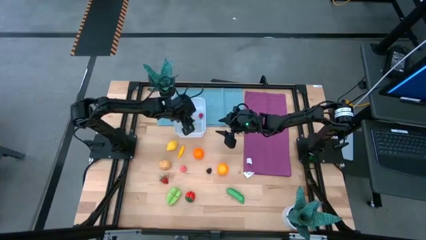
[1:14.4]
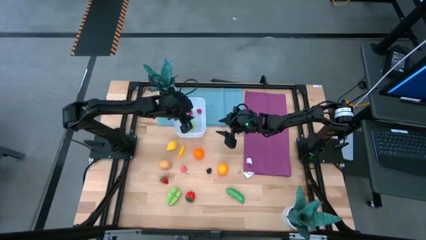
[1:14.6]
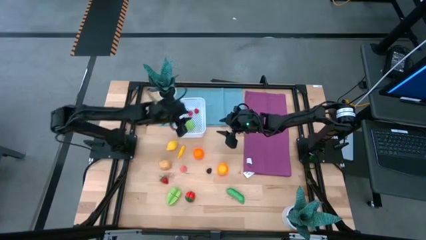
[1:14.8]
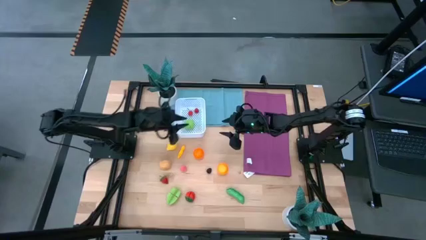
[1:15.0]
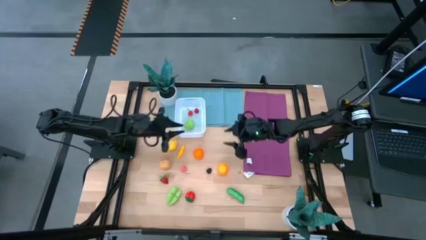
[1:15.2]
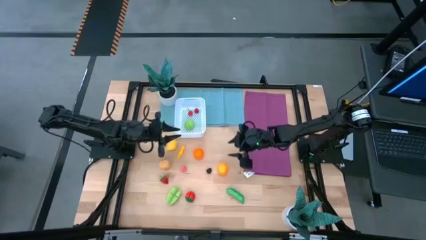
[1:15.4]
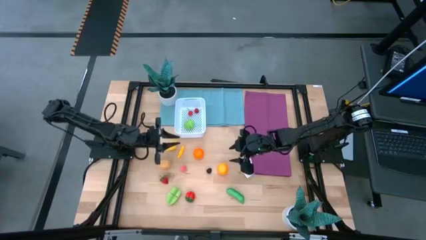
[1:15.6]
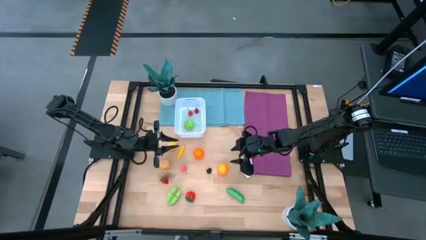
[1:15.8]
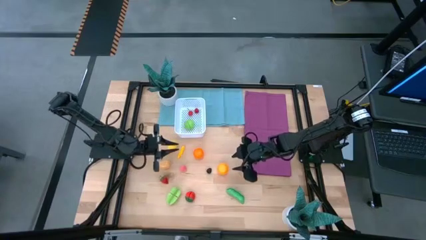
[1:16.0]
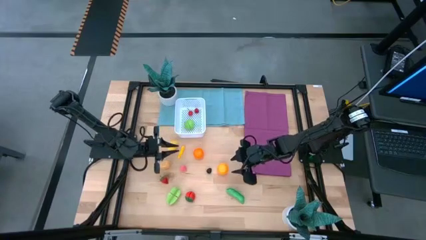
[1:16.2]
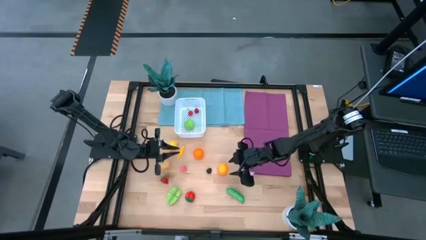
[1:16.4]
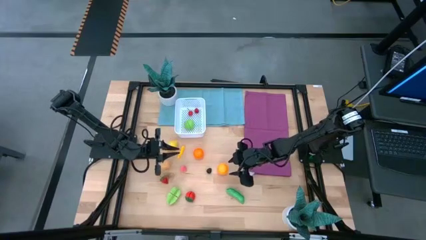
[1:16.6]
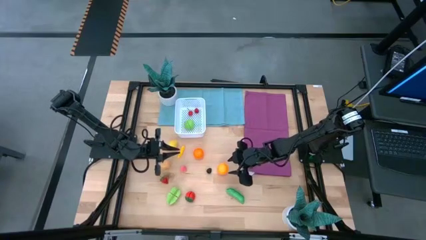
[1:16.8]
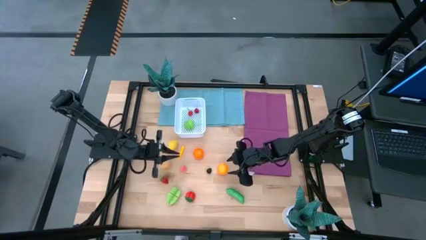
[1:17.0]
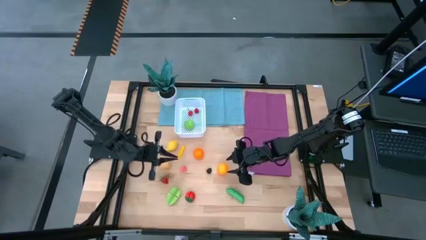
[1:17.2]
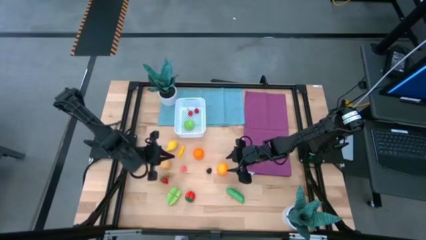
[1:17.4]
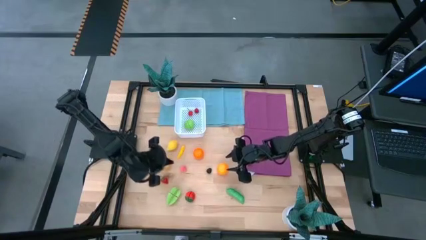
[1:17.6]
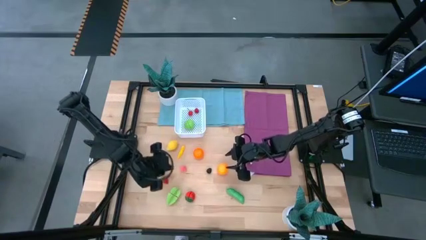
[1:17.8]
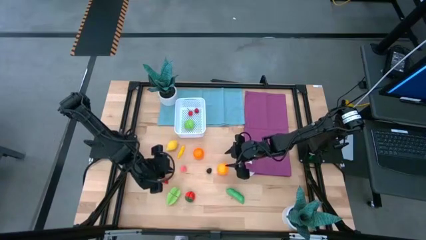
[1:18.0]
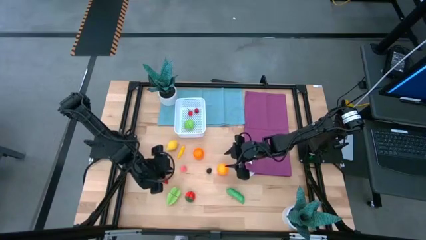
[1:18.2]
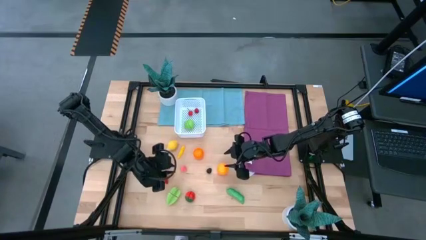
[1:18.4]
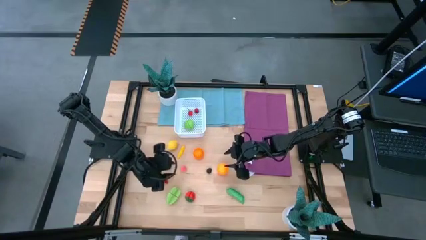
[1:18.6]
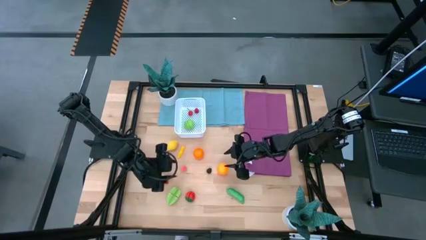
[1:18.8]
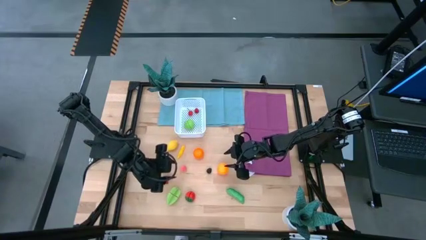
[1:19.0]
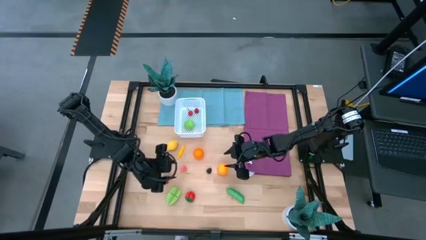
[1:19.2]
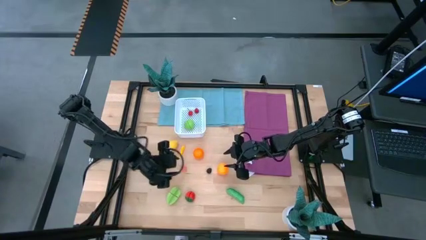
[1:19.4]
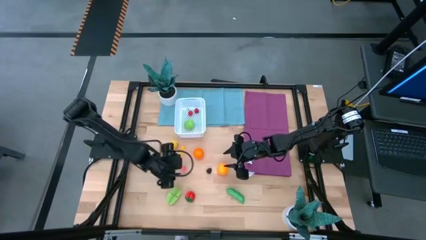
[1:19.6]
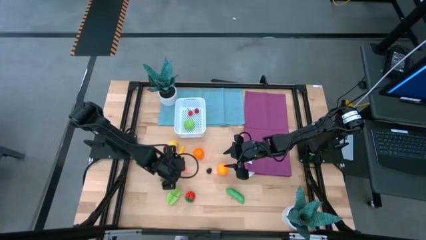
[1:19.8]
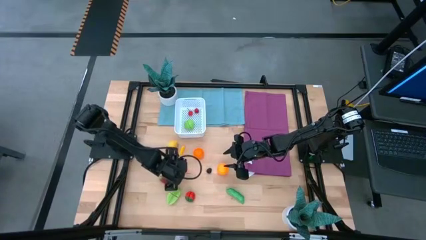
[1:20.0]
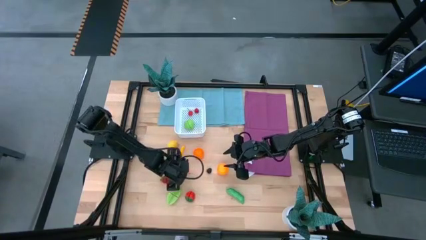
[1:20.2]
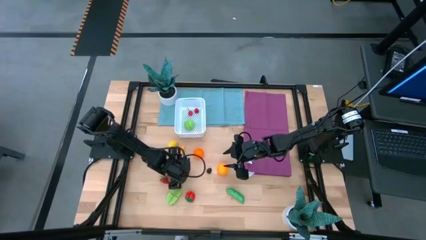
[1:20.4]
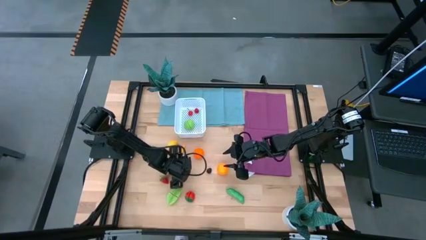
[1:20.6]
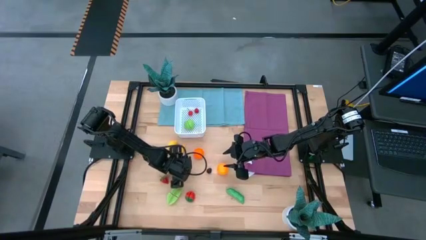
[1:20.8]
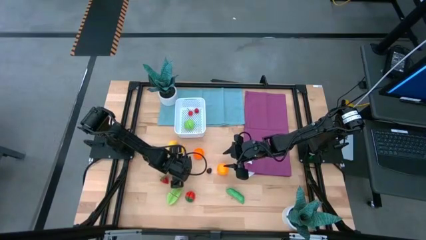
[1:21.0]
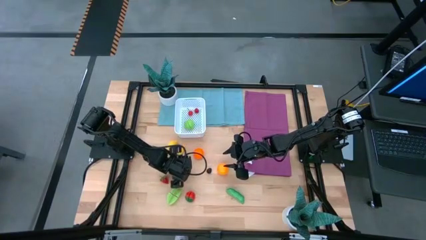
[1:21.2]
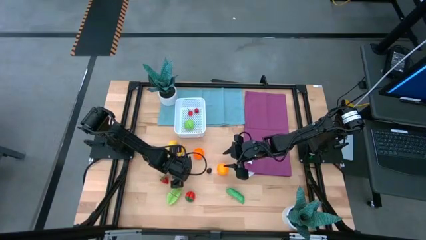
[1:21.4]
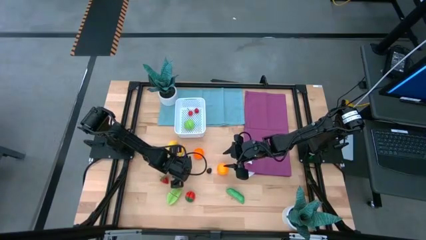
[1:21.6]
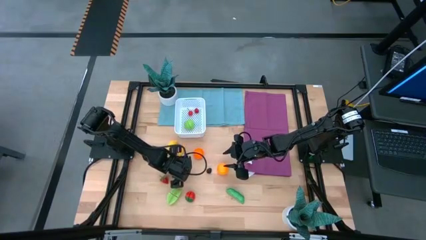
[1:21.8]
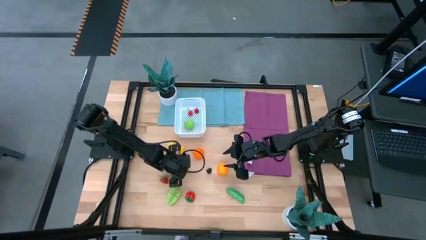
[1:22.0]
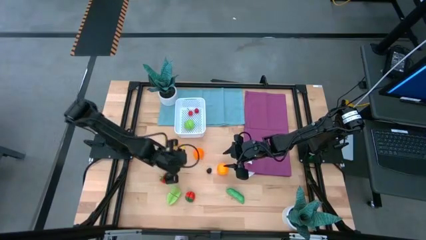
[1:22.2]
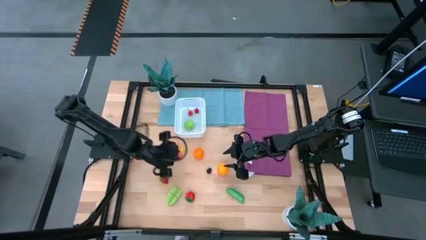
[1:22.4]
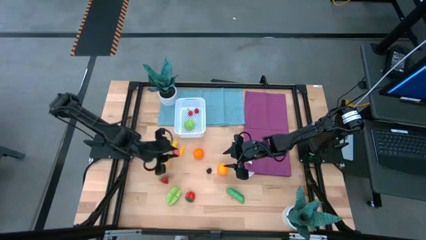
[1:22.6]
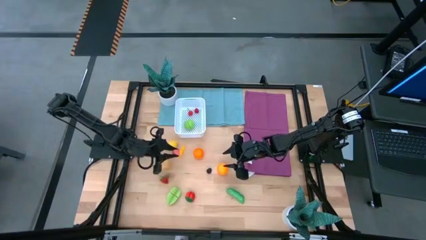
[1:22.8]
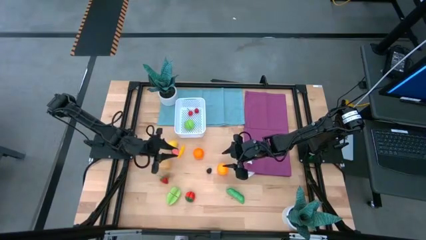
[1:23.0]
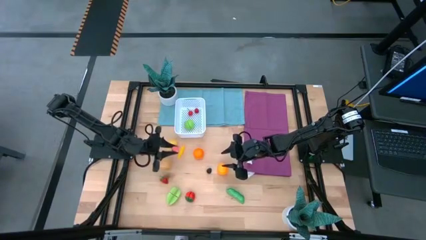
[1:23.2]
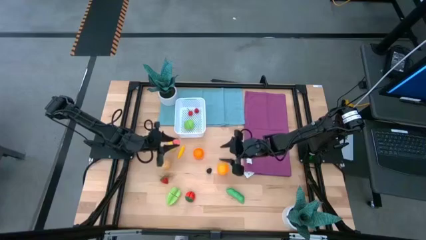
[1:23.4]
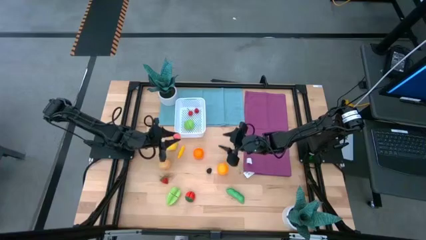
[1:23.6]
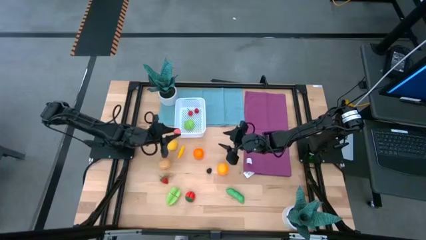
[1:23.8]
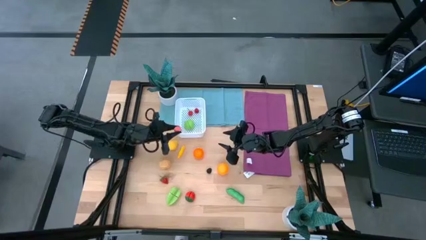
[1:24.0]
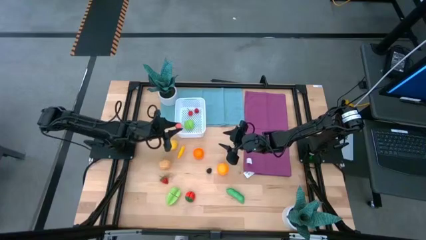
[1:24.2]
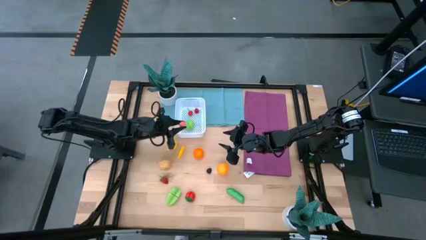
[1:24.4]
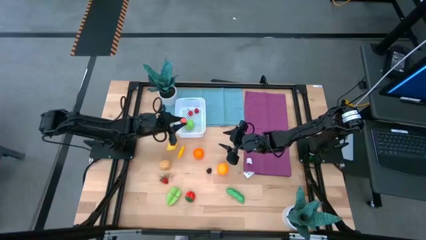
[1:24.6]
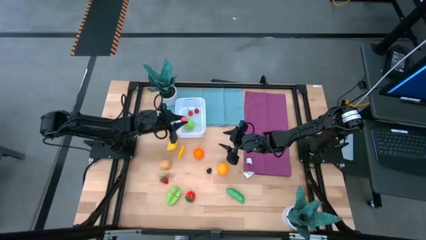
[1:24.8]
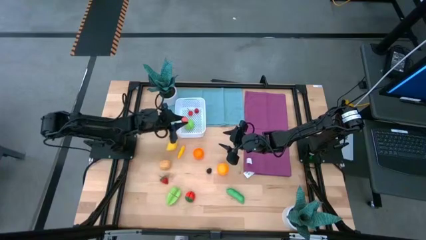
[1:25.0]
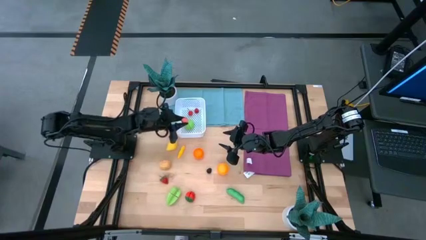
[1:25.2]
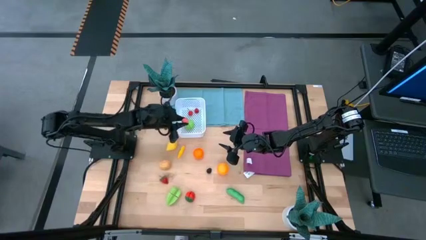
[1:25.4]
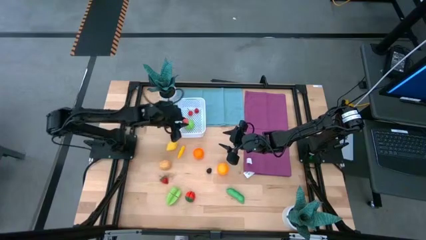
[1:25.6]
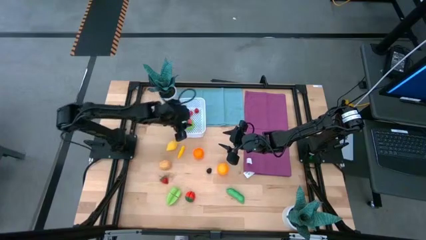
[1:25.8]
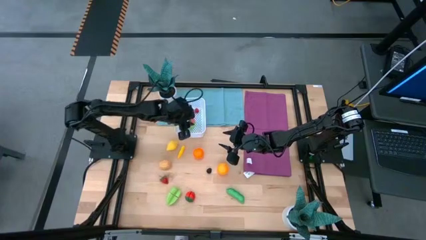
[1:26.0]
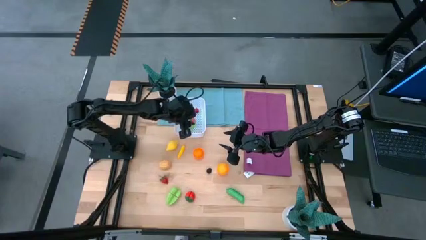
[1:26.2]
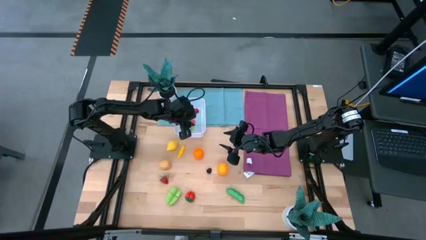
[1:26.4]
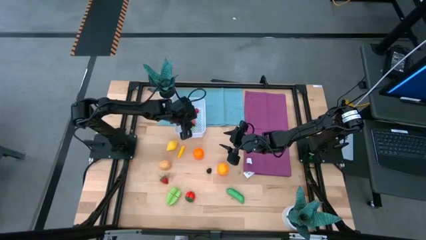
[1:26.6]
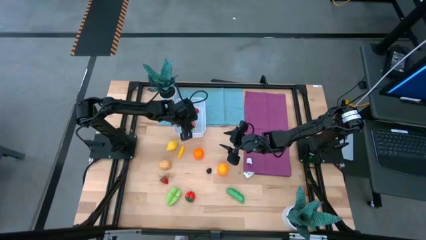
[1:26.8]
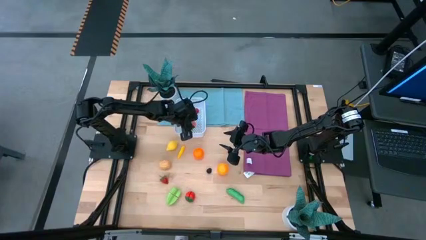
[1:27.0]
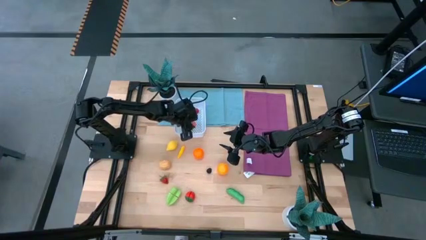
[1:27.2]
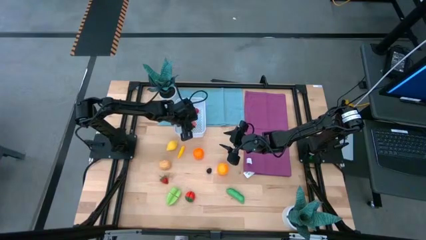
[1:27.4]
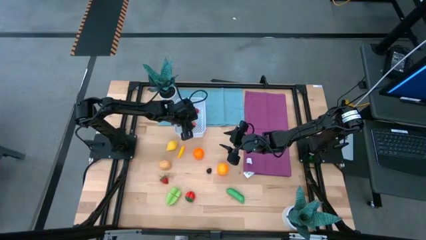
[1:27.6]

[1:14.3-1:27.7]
Task: Pick and placing Produce into tupperware
Put the pink peach into the white basket

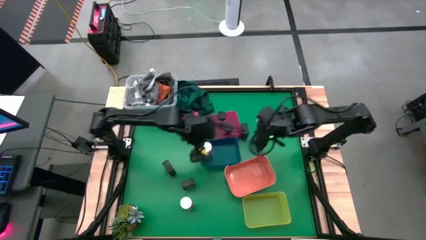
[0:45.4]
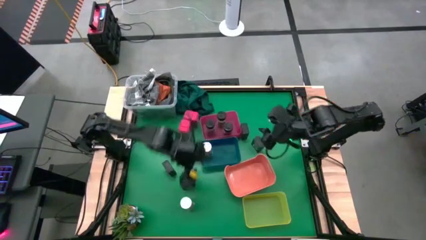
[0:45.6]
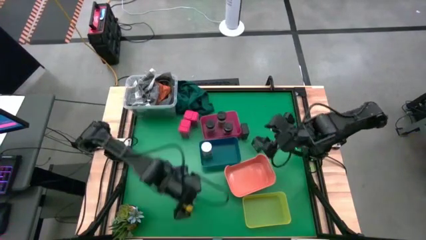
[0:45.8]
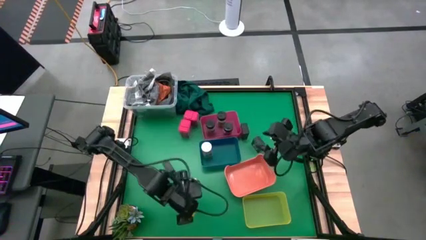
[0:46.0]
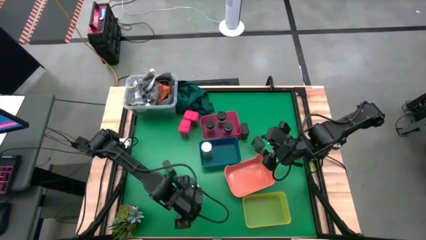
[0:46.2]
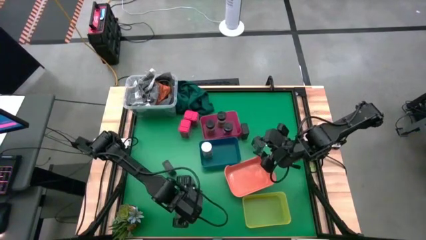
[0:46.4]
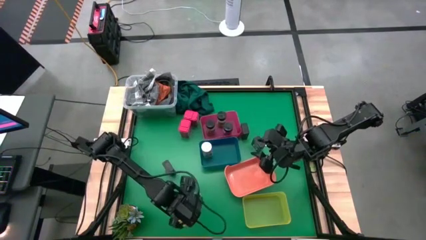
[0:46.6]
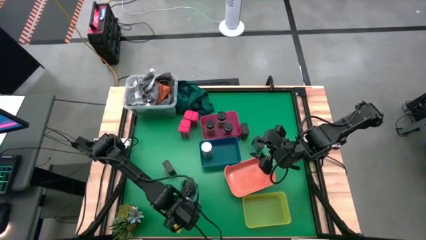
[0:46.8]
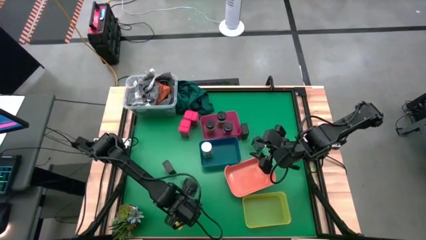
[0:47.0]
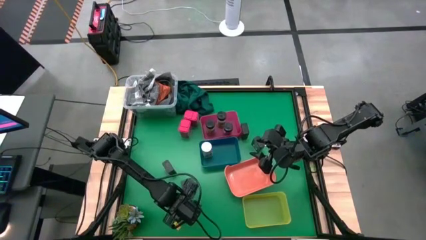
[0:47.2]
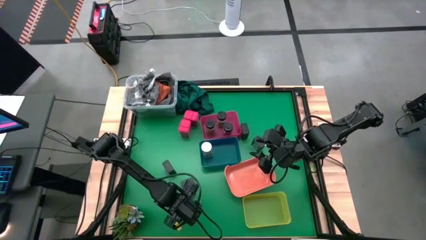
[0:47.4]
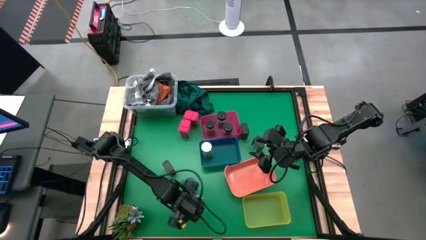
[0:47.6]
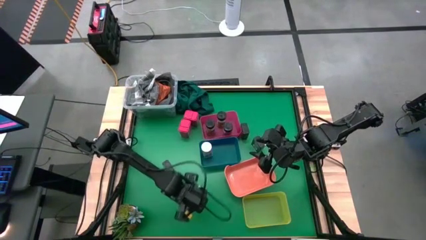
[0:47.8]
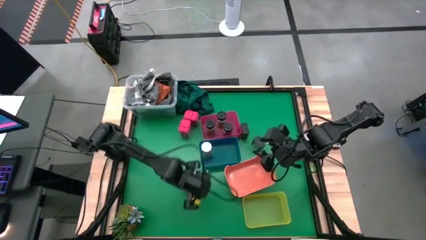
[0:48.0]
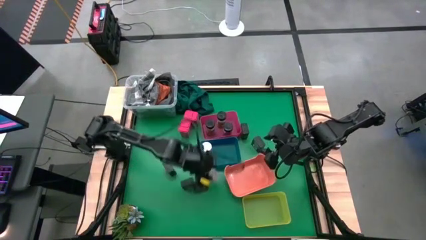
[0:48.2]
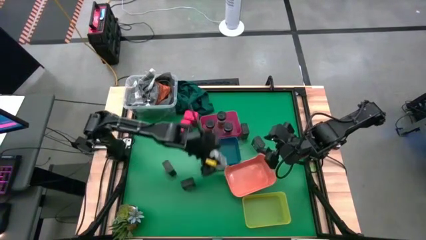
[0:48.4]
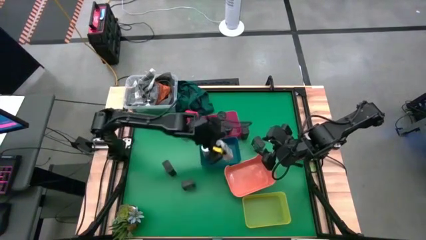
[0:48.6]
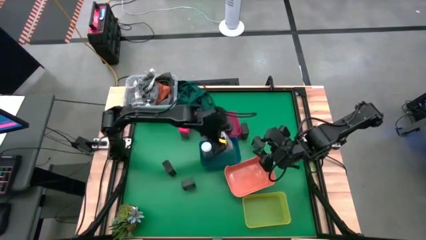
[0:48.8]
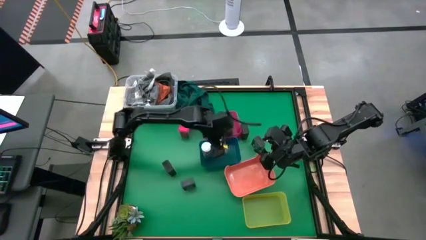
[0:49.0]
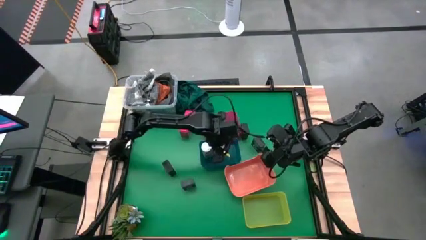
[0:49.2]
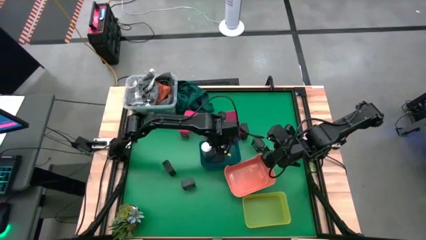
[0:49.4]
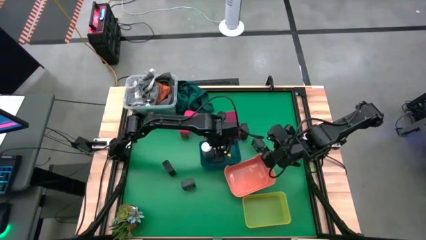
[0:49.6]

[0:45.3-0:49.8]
Task: Sort spices by type
Put the white seasoning bottle into the blue bin
